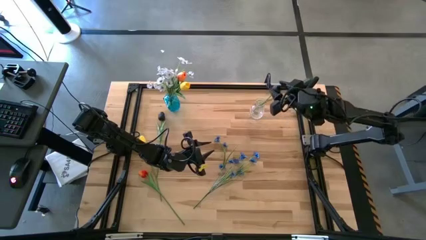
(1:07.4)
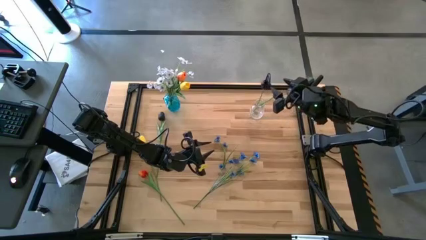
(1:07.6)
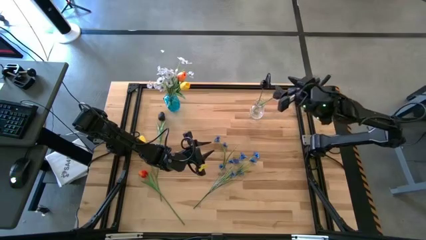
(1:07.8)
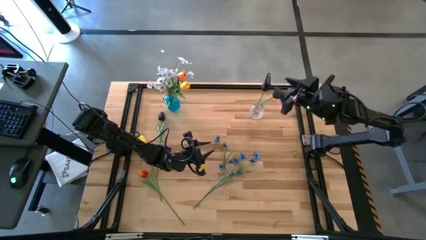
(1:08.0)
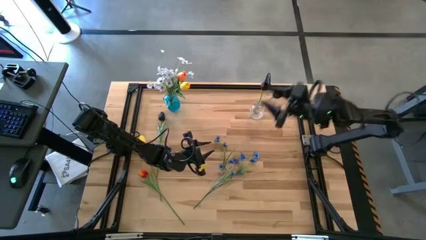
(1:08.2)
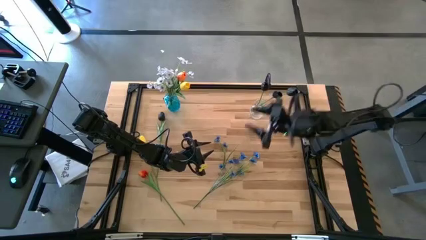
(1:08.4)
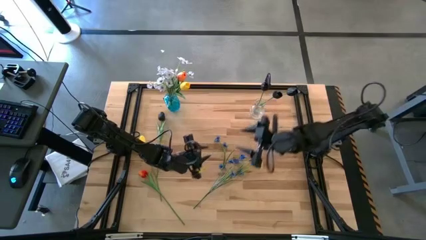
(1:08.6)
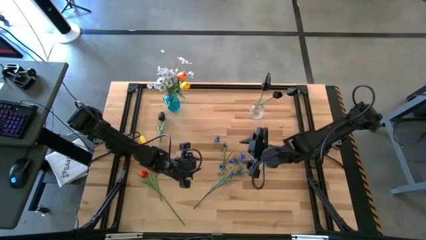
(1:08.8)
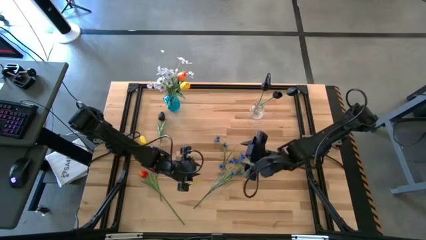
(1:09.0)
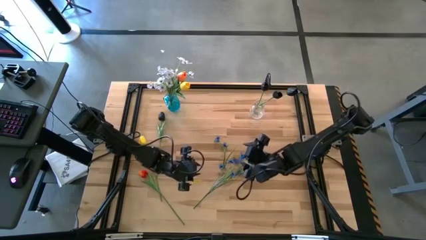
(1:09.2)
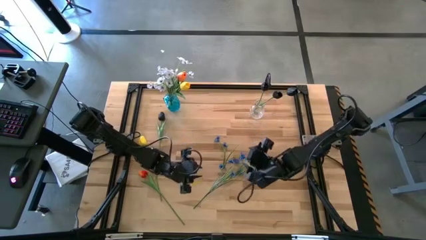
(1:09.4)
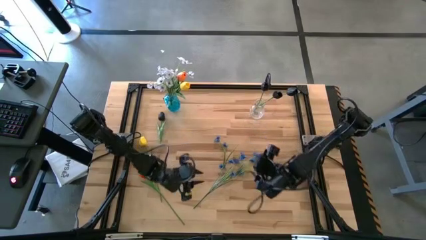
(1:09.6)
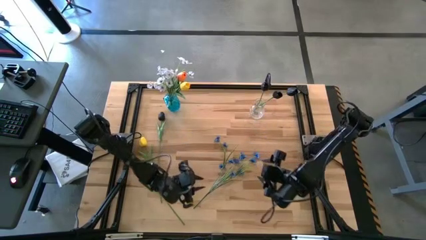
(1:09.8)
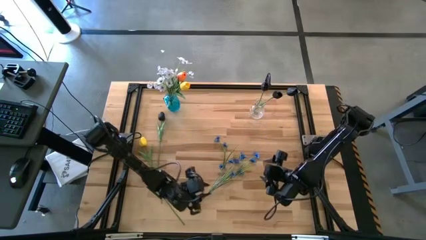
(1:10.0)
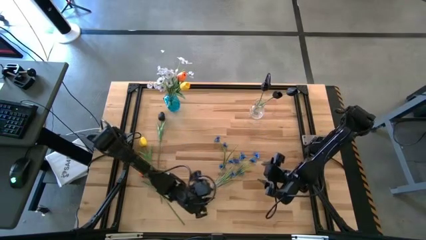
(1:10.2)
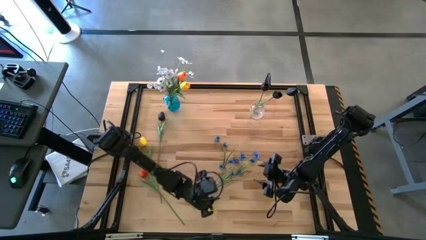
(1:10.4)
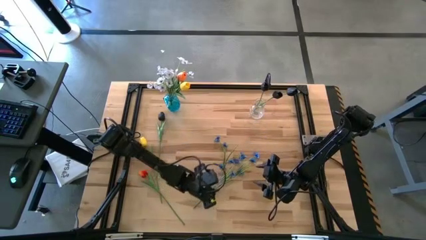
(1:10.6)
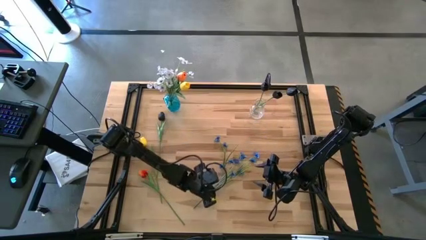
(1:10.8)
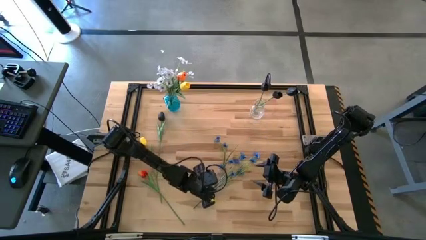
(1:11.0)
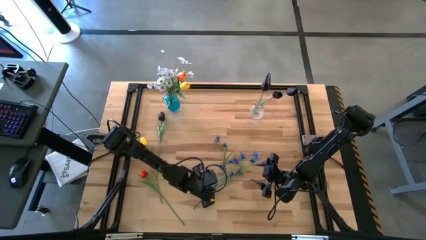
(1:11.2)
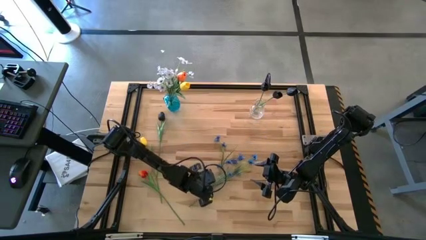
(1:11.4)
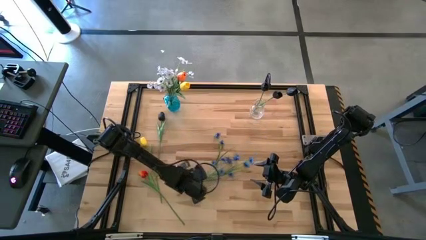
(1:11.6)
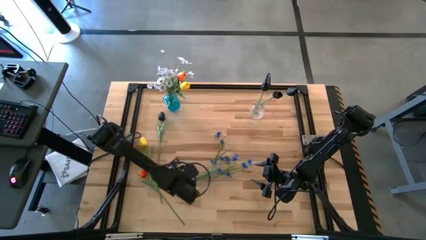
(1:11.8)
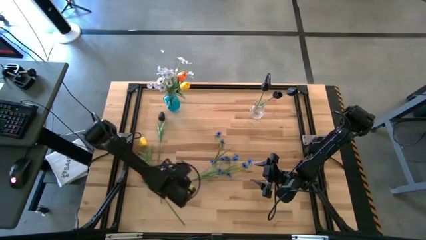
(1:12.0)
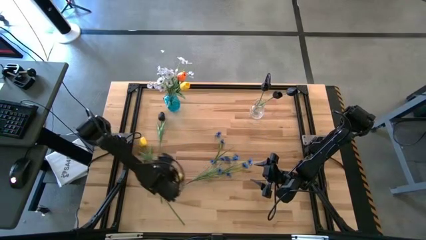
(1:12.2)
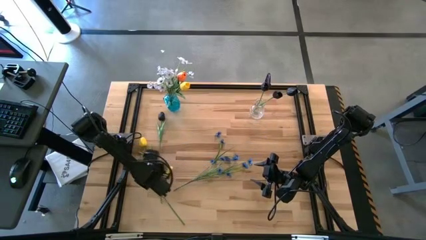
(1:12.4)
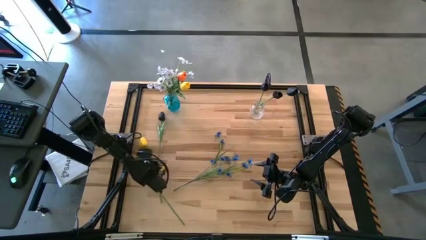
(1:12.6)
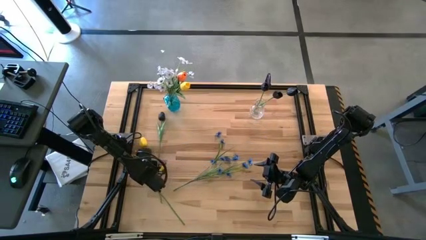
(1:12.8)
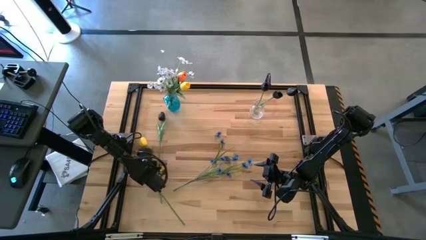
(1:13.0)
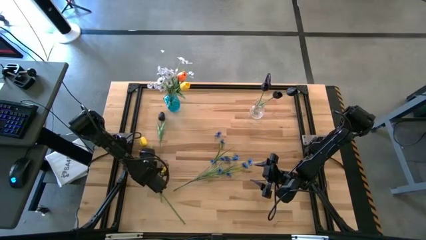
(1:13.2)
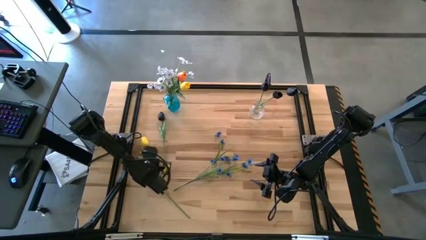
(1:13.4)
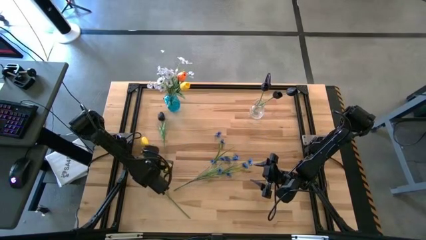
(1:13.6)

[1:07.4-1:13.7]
Task: Sort flowers into vase by color
Put the yellow flower into the blue vase

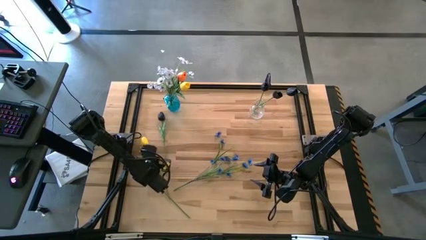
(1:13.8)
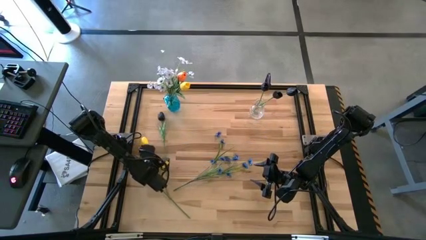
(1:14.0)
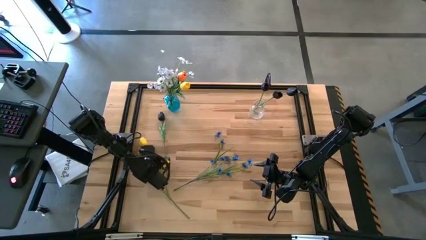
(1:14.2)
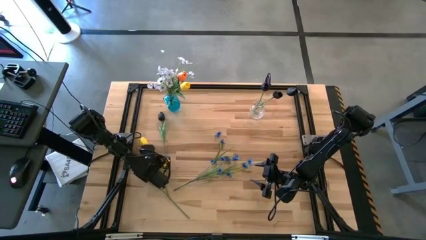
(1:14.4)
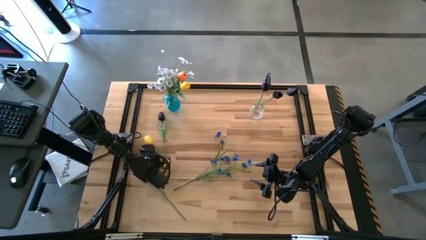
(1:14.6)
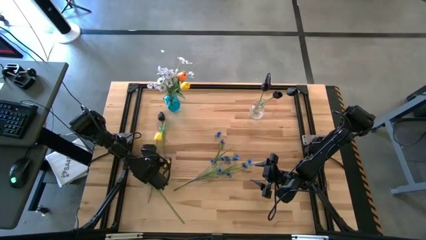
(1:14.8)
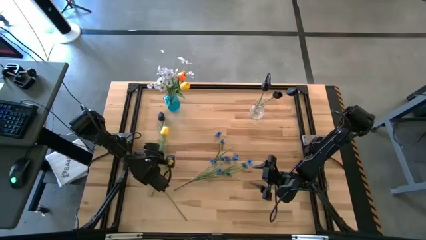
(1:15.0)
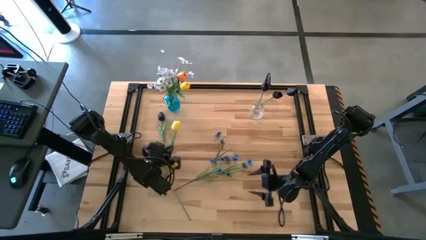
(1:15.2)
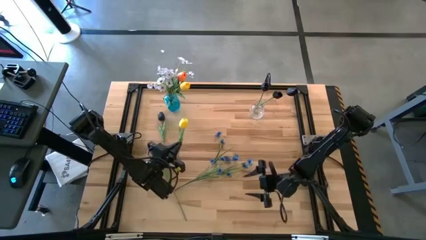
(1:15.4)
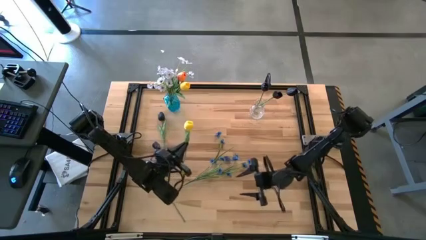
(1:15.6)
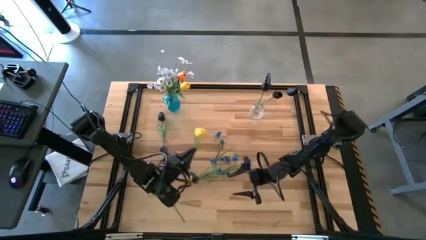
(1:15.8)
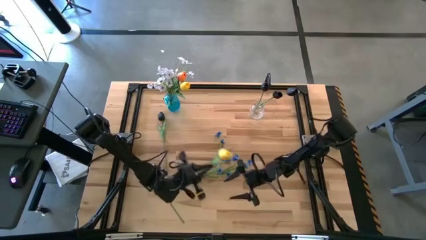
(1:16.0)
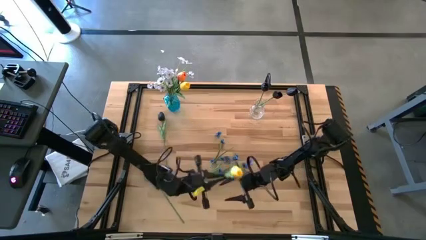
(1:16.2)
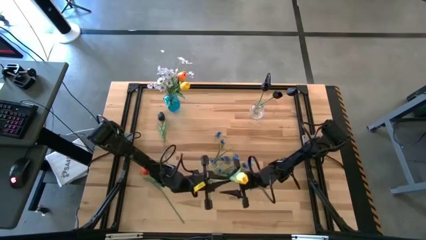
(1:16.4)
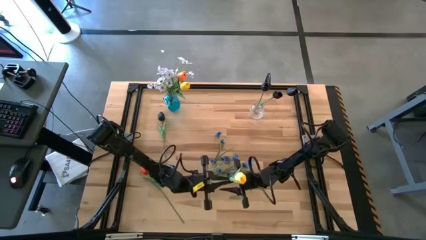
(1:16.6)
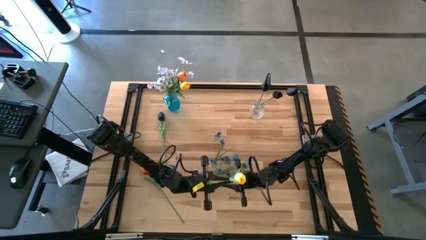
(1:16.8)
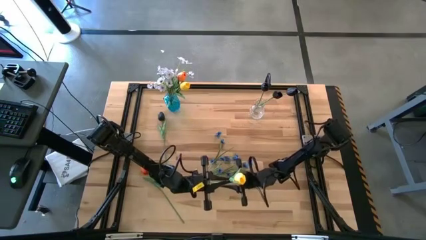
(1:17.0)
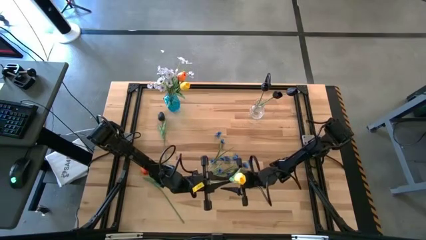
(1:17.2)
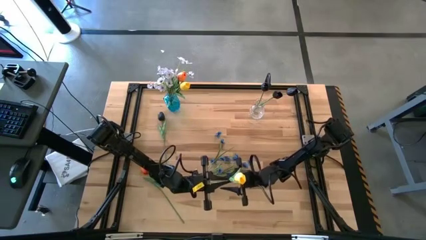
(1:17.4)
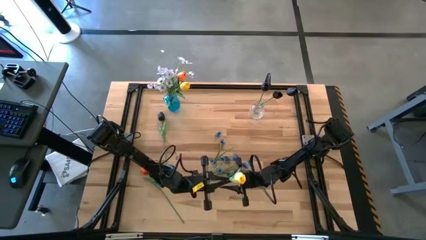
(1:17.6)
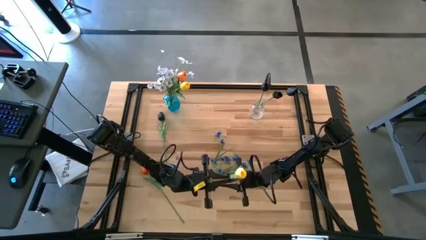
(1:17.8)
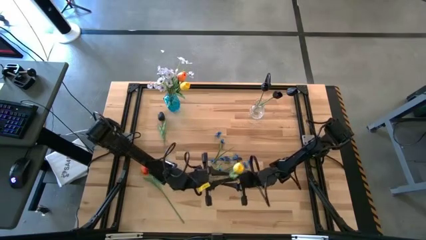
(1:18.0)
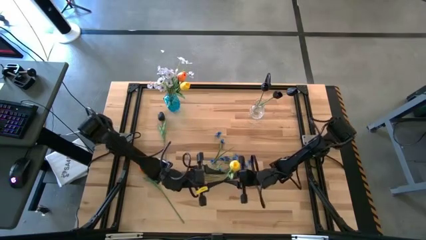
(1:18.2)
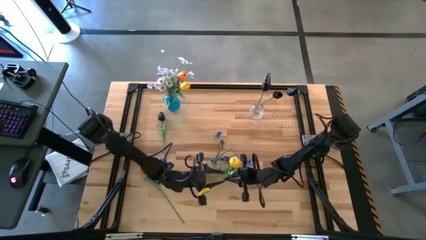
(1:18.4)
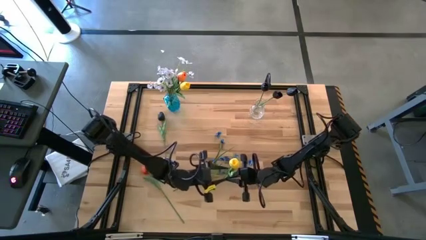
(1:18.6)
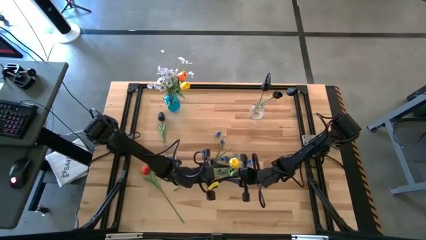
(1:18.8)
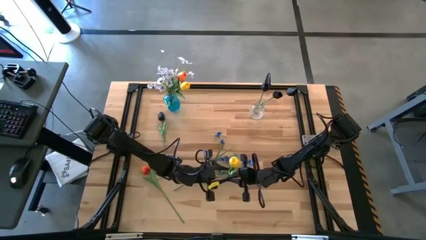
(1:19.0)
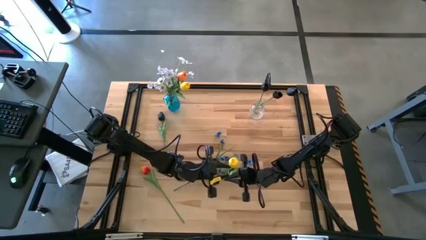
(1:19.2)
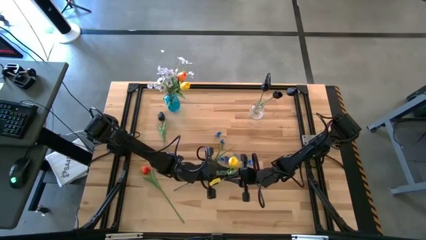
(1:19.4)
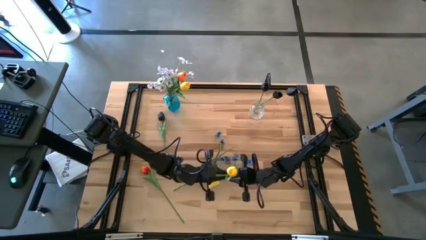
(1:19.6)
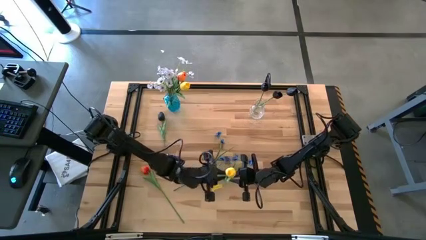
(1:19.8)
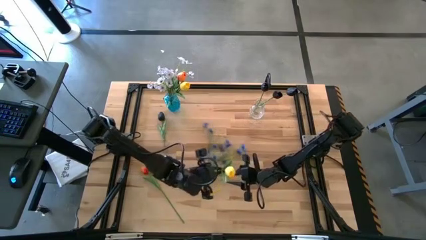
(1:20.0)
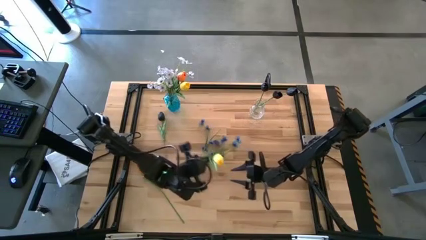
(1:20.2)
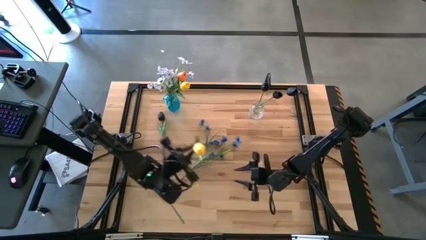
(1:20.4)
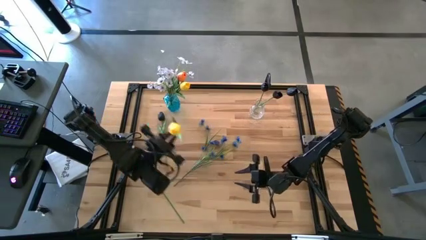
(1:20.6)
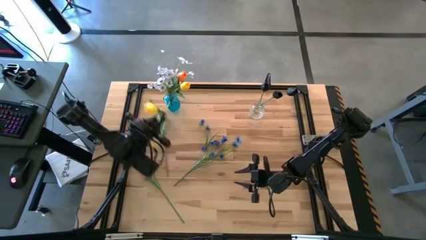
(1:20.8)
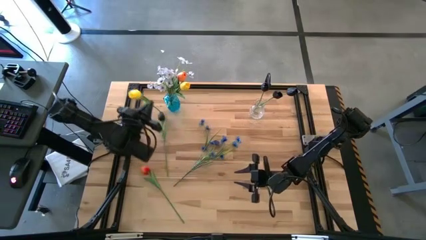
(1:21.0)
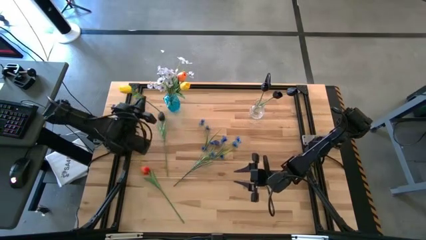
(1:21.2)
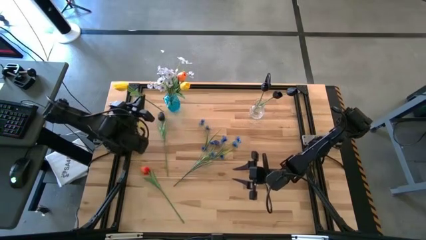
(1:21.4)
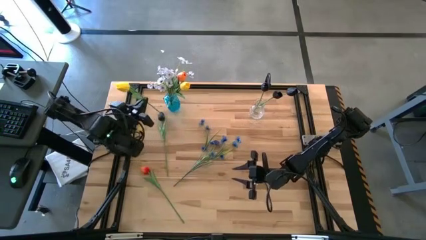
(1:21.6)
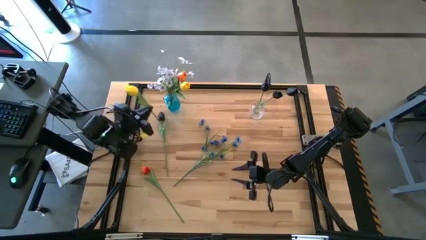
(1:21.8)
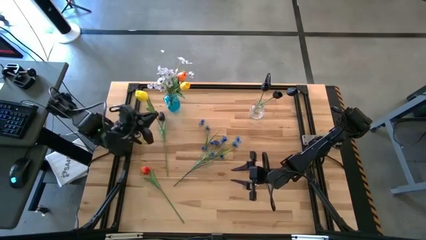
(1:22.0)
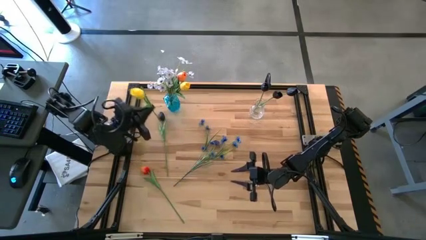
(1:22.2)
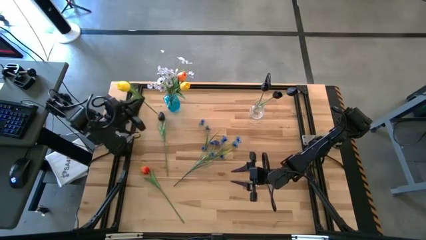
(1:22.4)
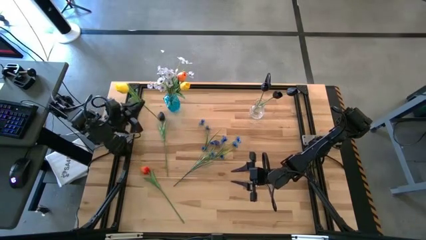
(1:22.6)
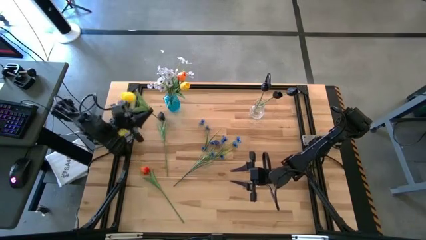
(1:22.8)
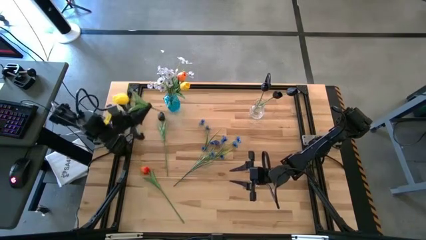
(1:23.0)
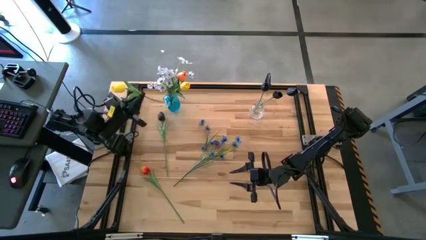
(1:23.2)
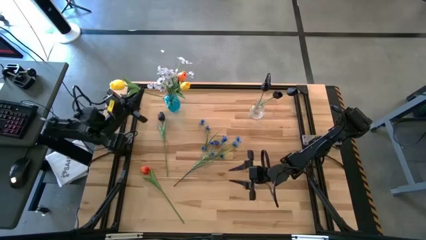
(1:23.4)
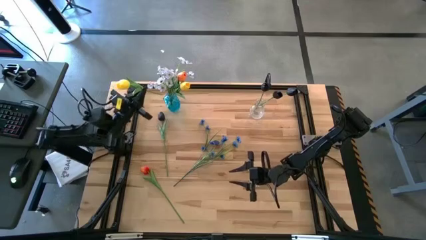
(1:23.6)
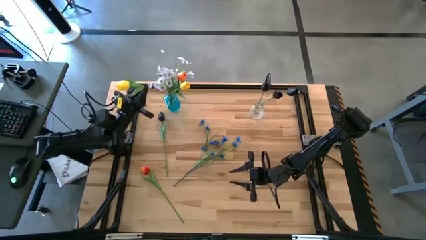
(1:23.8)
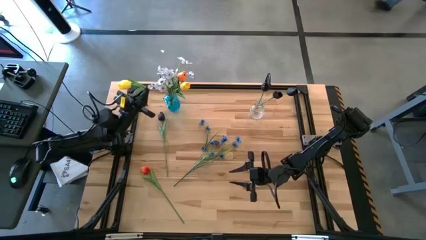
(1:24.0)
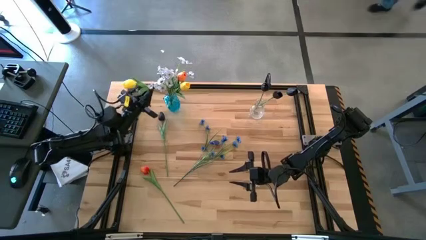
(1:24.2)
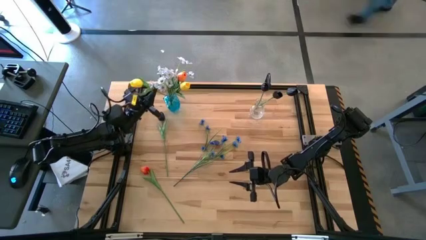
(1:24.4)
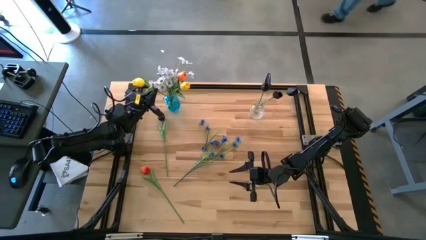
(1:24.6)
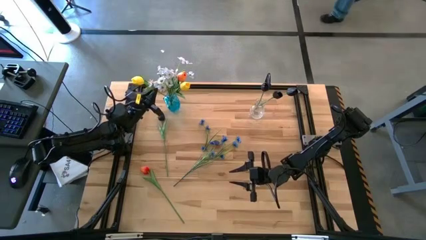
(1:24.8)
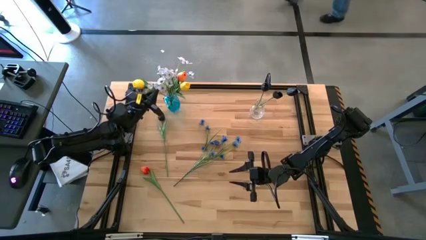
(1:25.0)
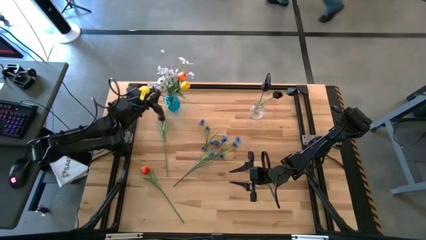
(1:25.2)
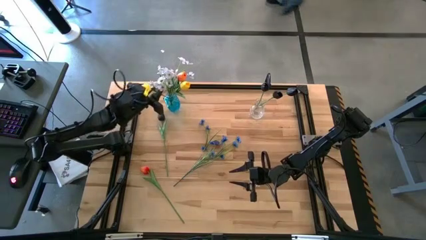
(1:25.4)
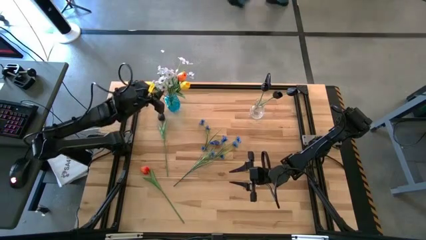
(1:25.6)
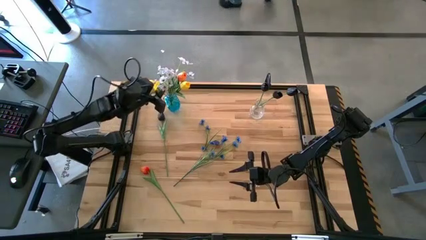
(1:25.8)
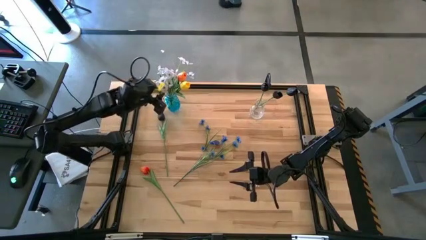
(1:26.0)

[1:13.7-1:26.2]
Put the yellow flower into the blue vase
